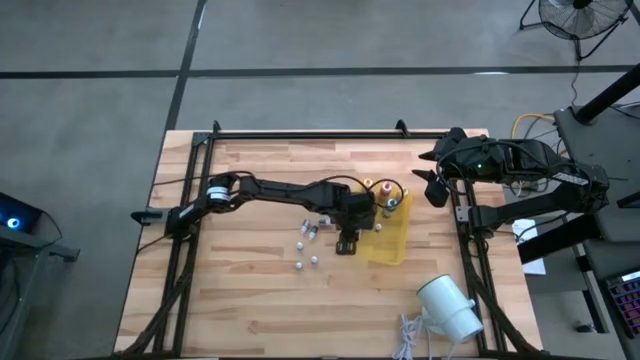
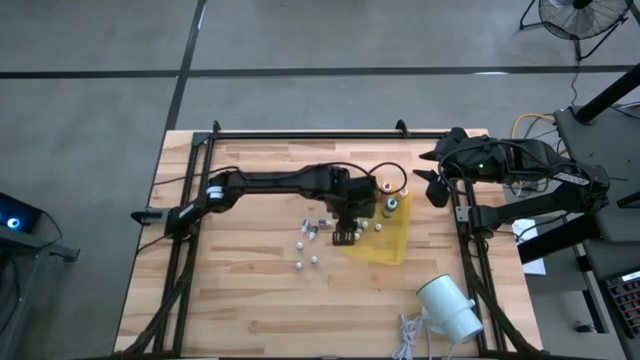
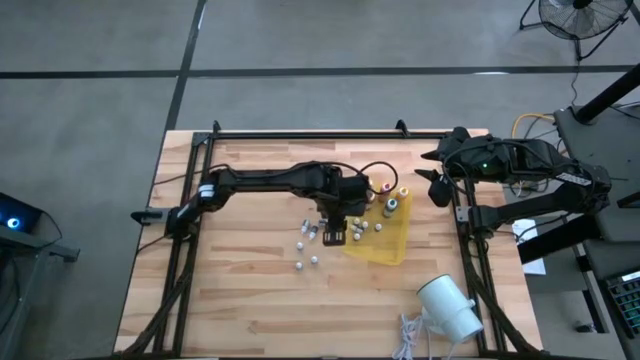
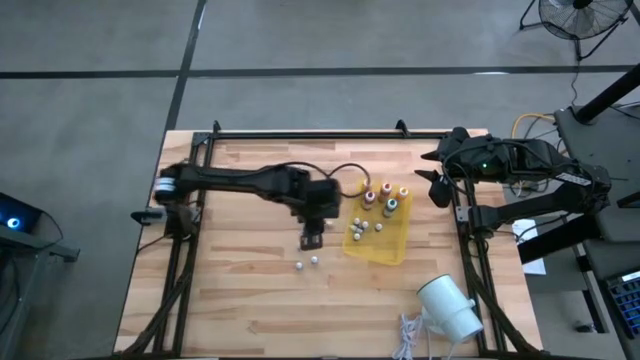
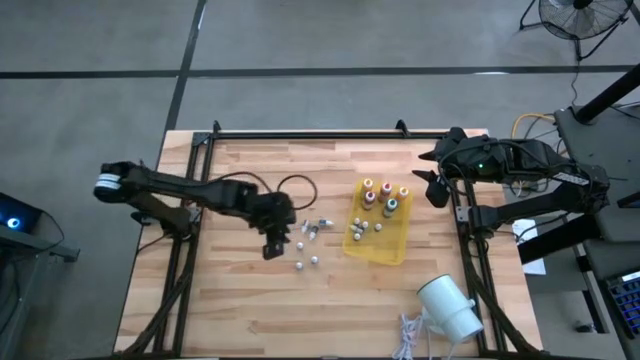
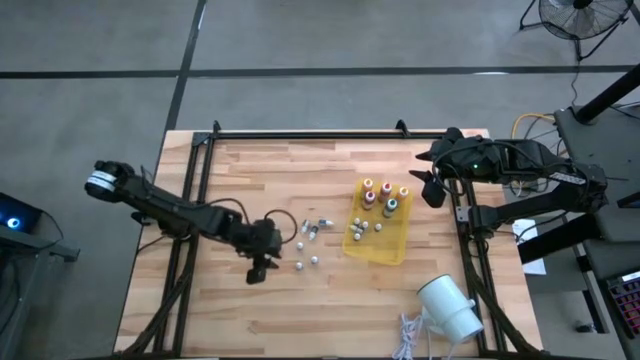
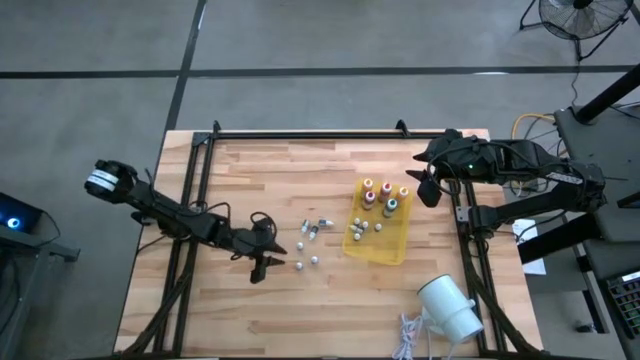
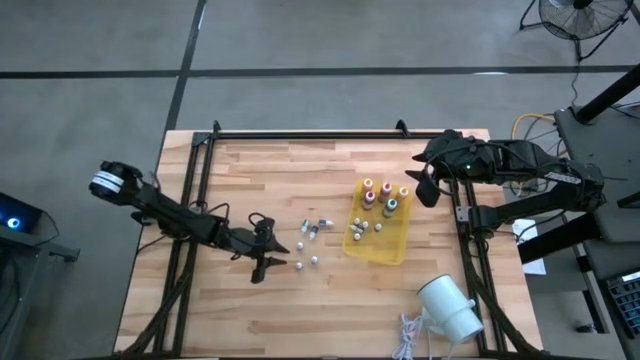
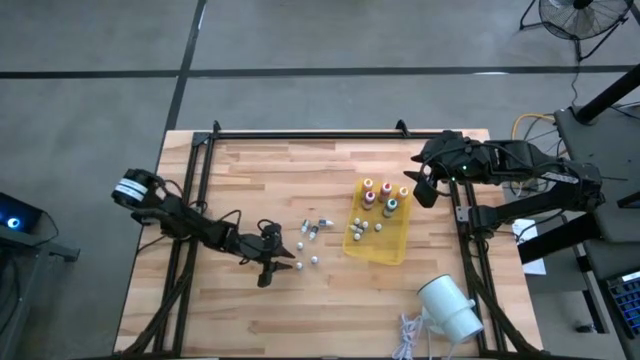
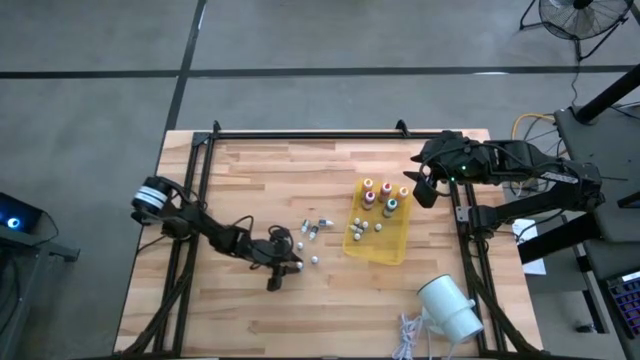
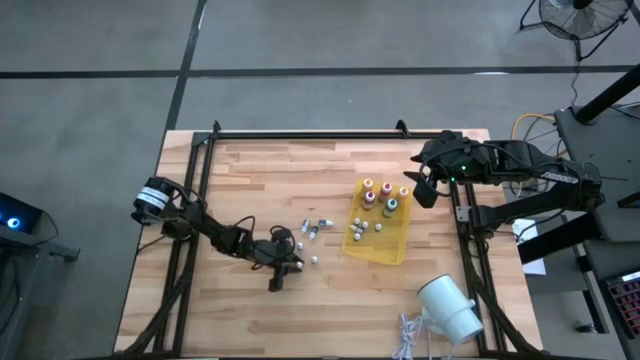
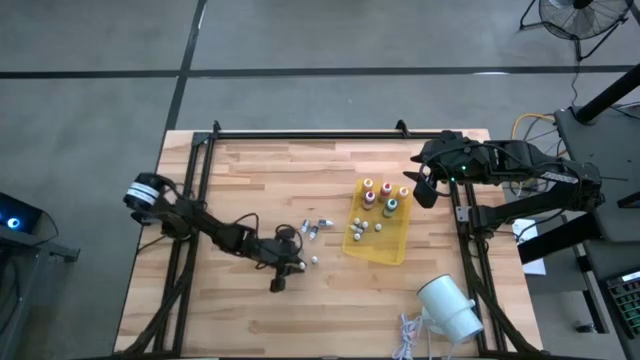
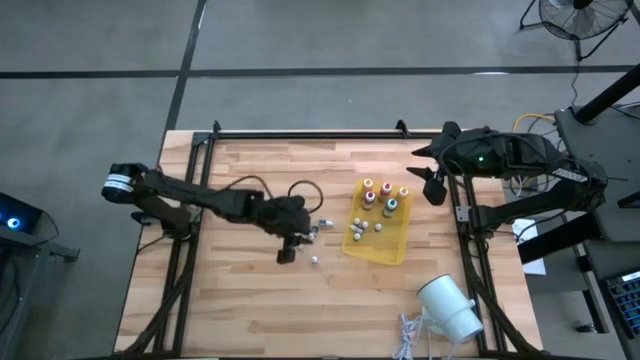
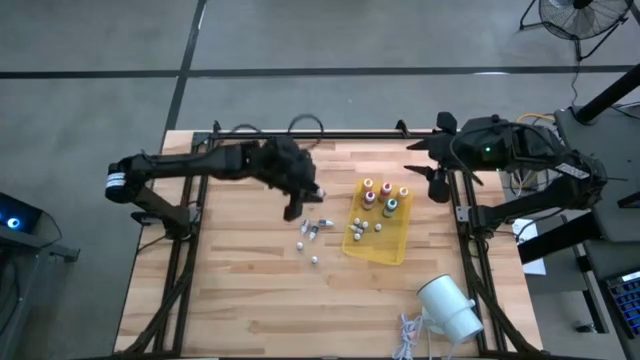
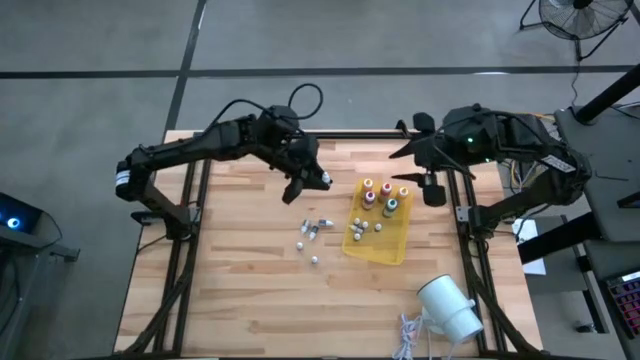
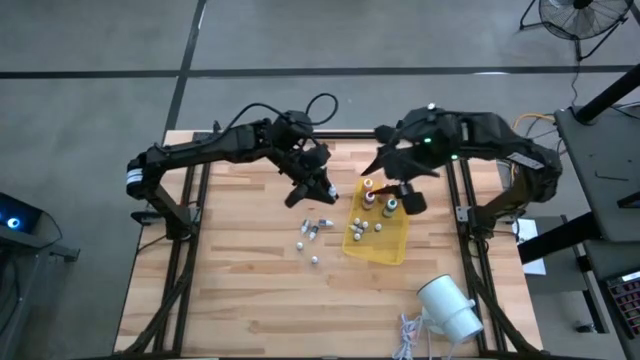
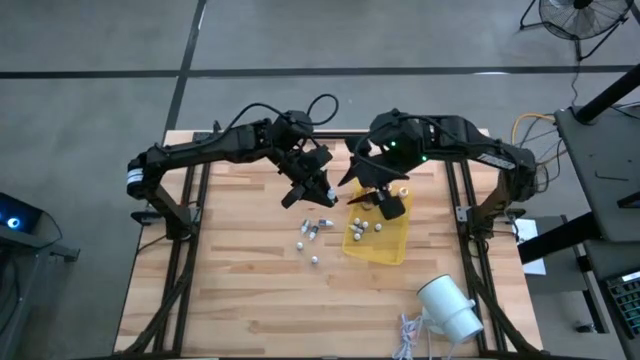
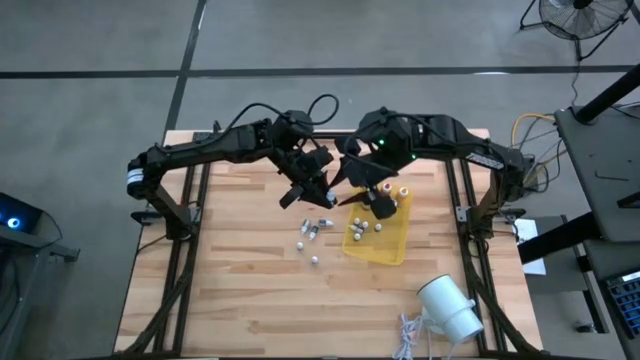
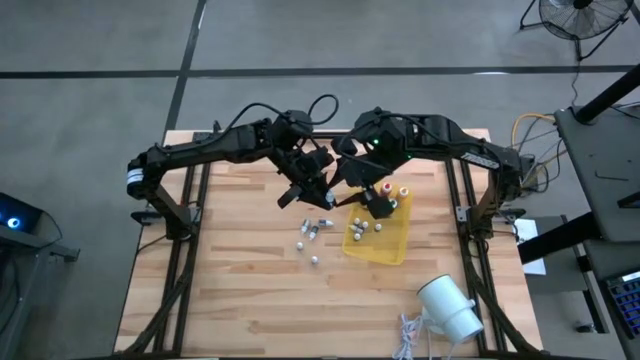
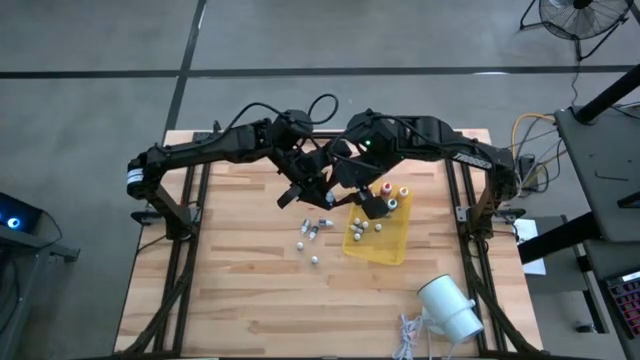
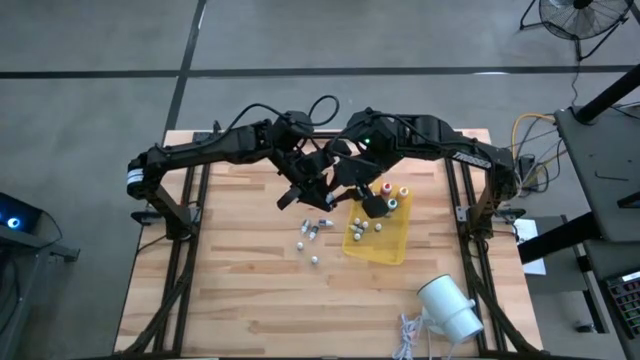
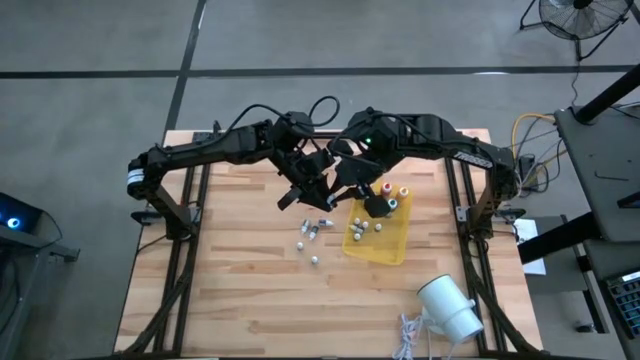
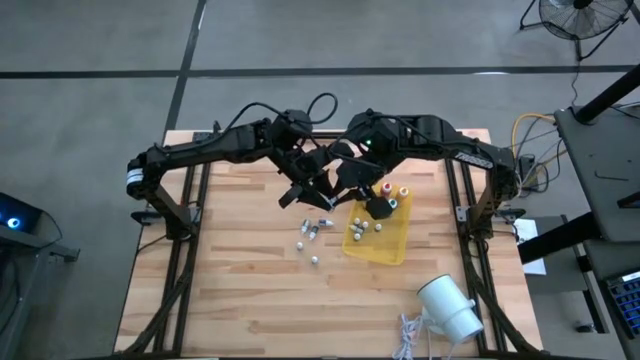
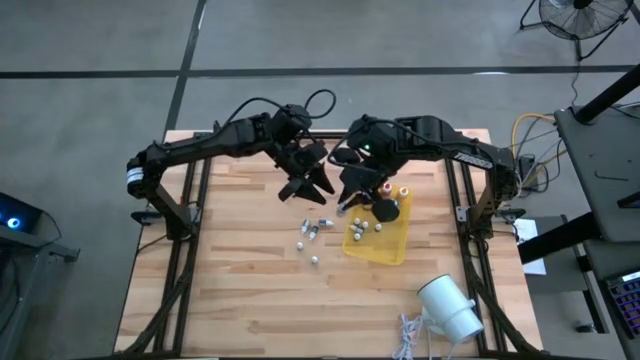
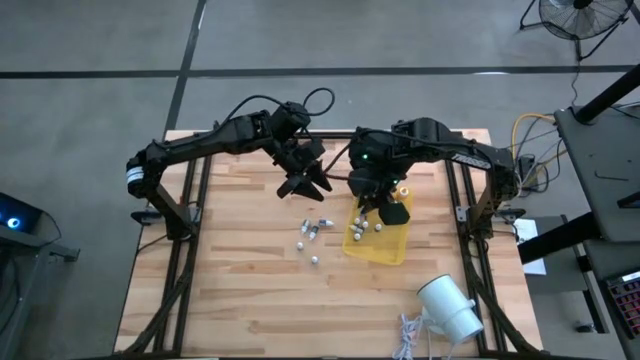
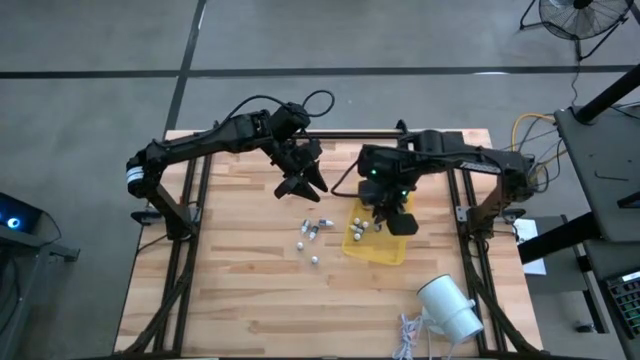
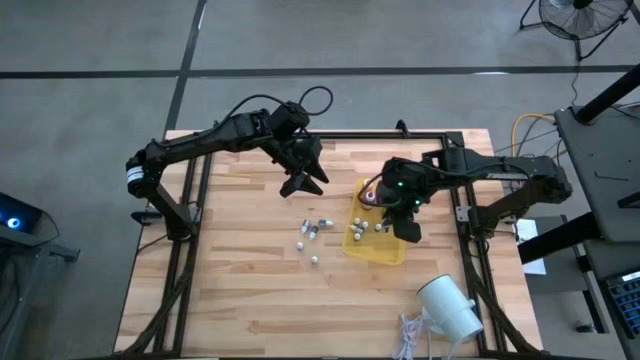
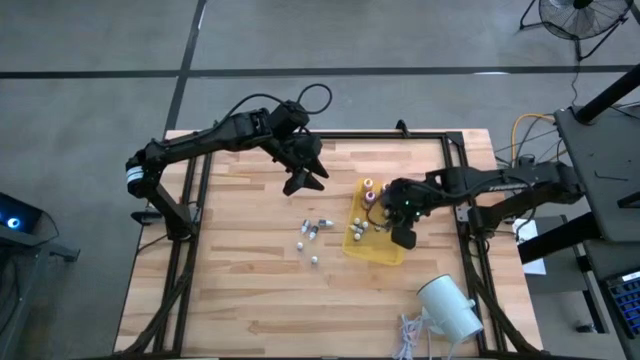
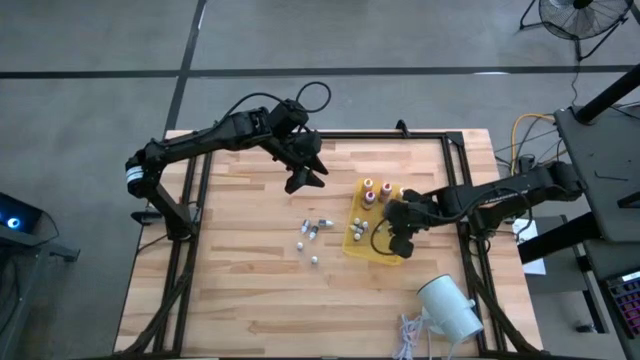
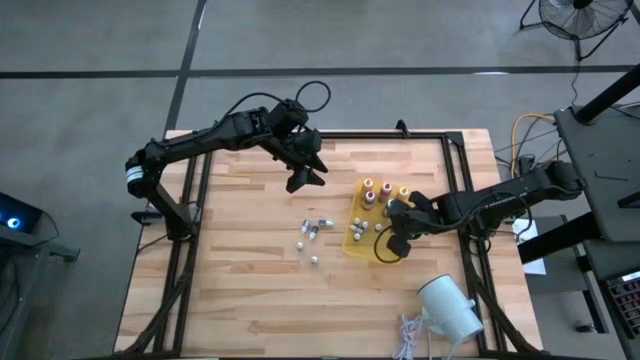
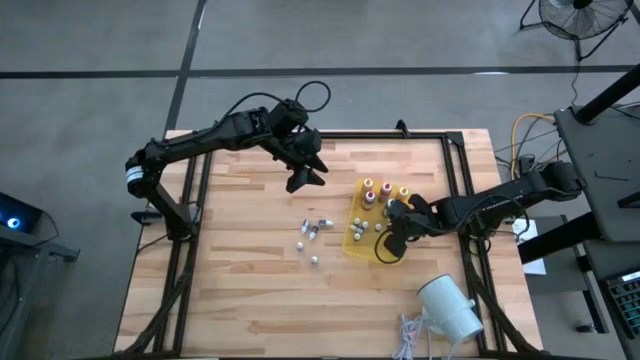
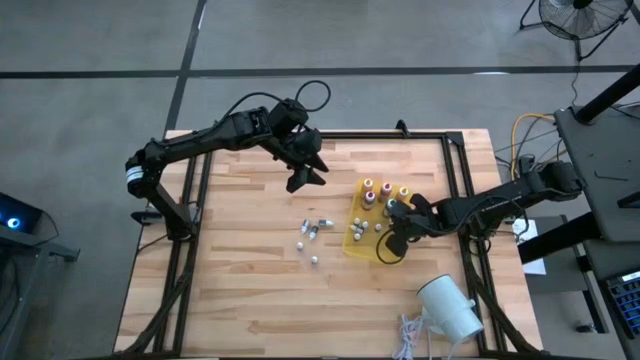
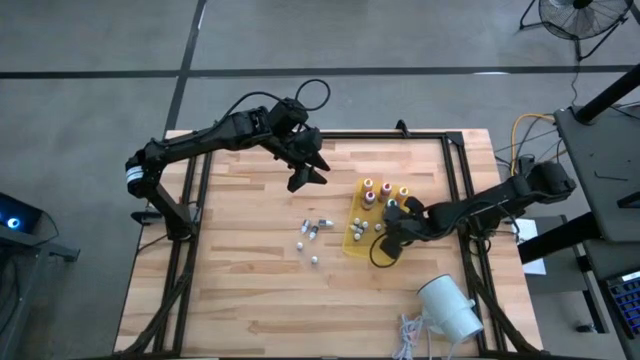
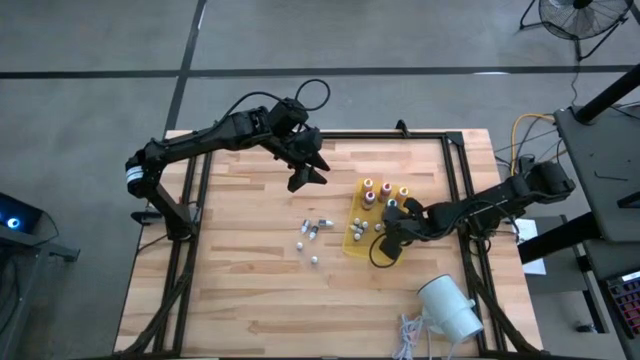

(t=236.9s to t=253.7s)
Task: Pick & Place food coloring
Put the small red food coloring bottle into the yellow bin

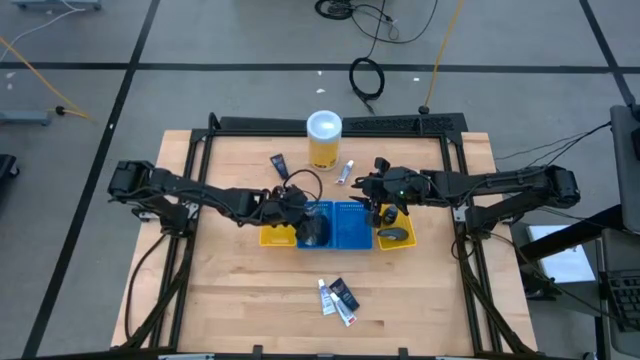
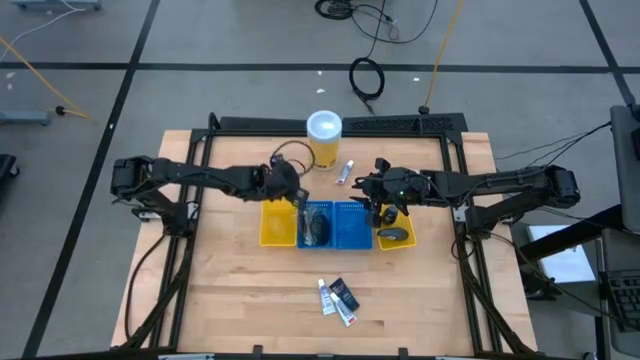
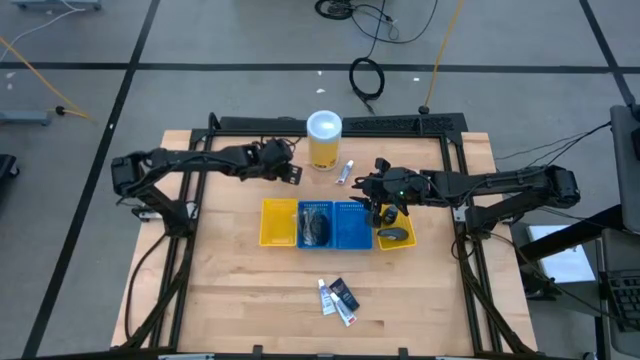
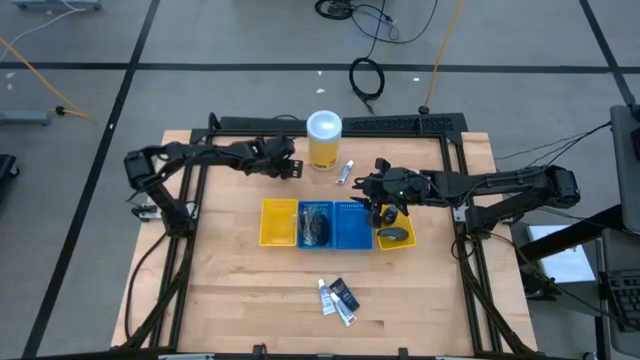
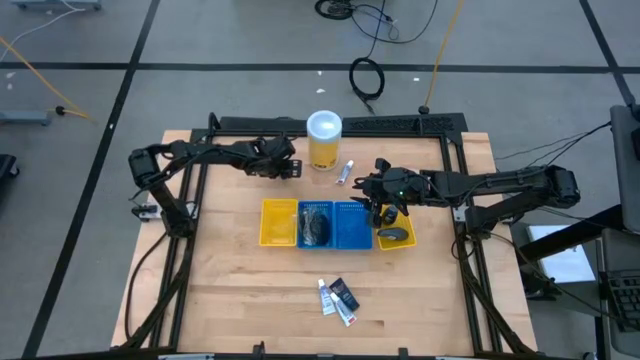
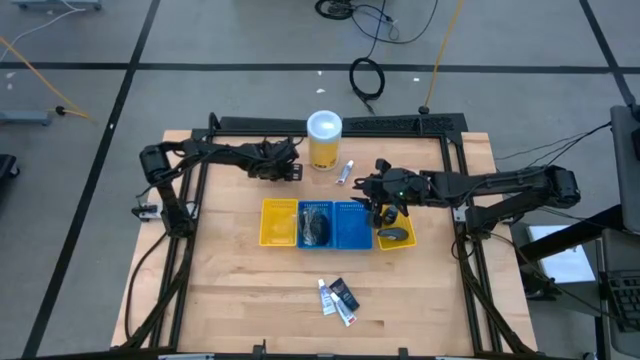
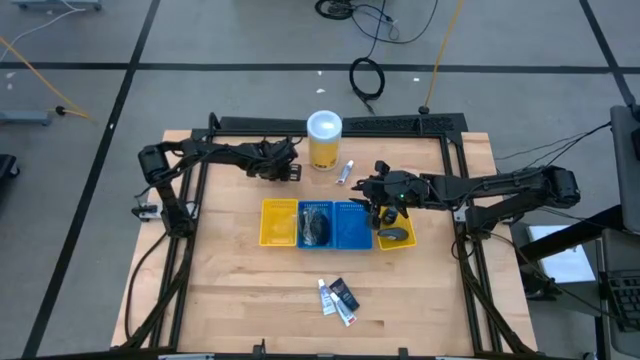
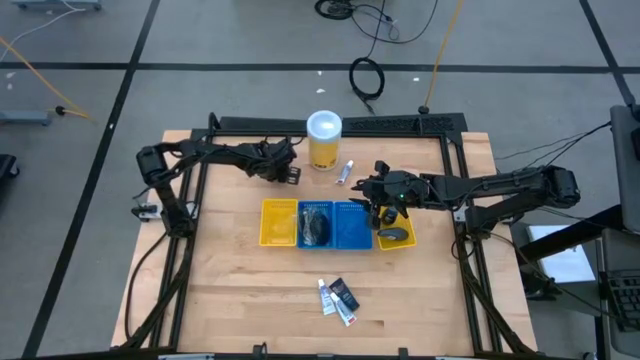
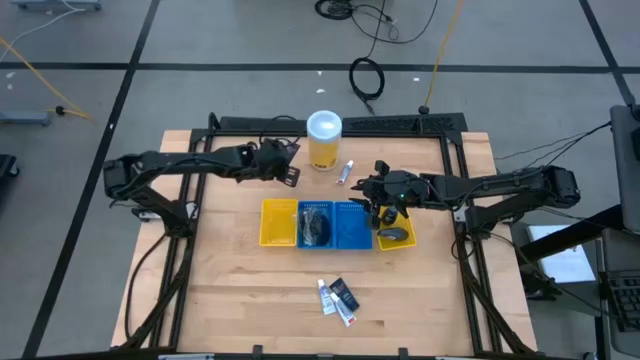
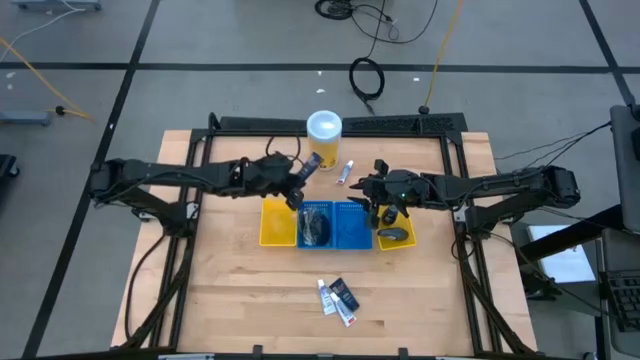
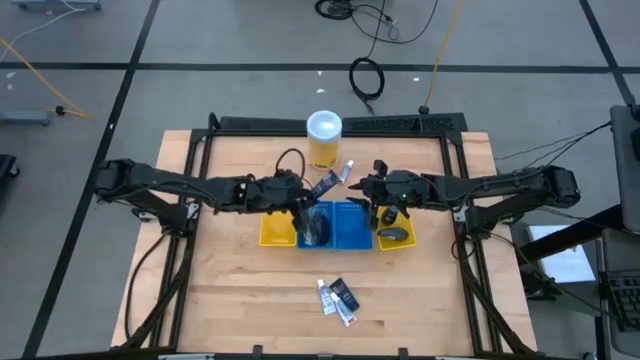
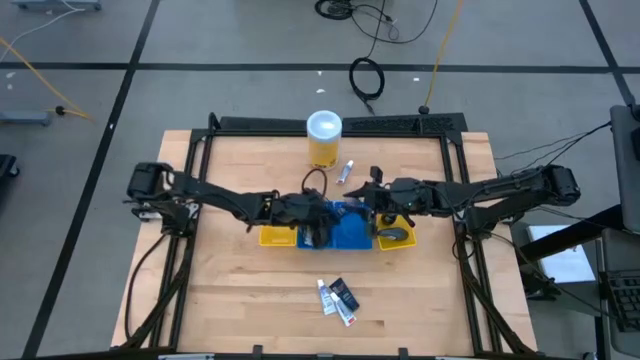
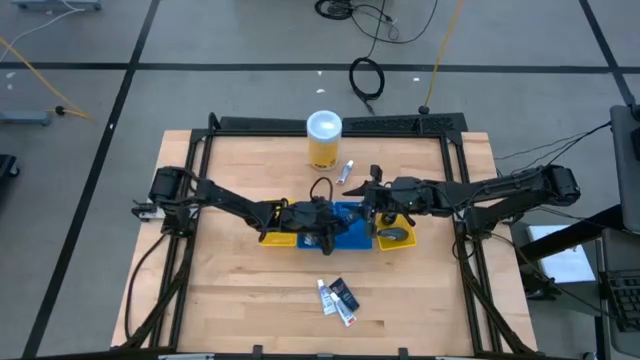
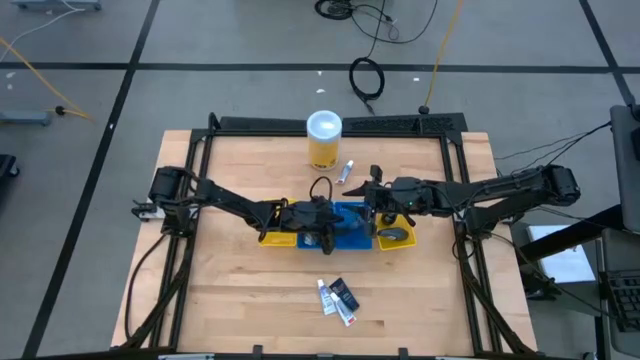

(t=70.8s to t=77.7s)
Task: Pick & Place Travel size toiletries
Put the blue shave cream into the right blue bin
